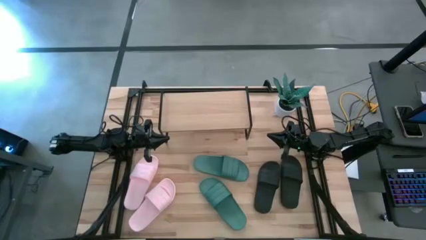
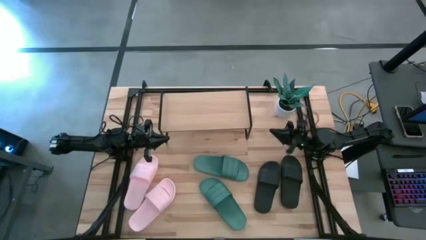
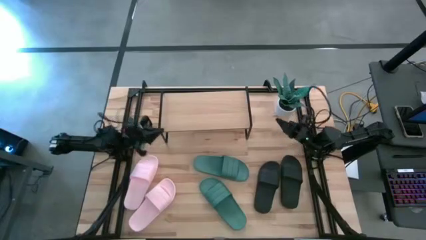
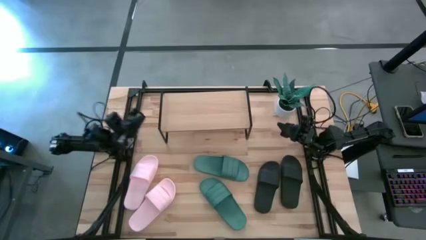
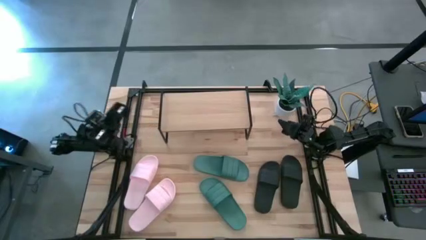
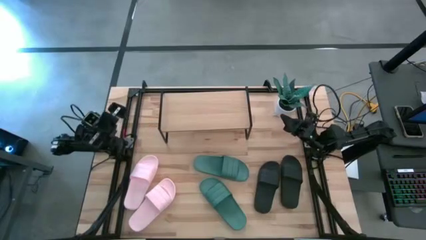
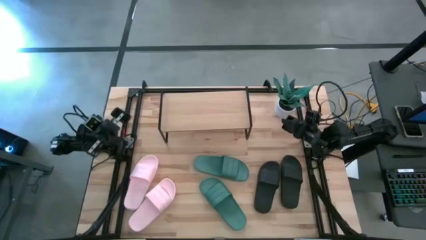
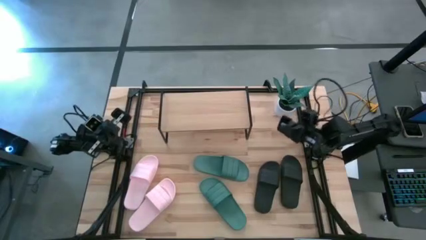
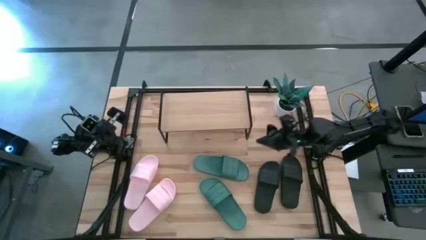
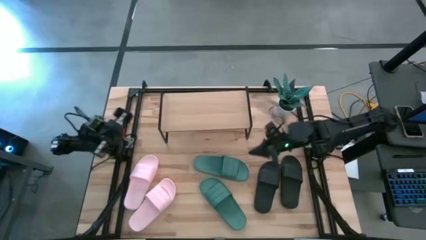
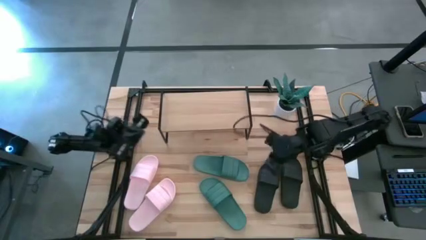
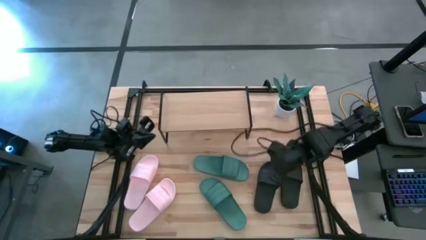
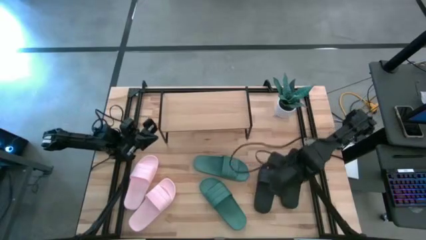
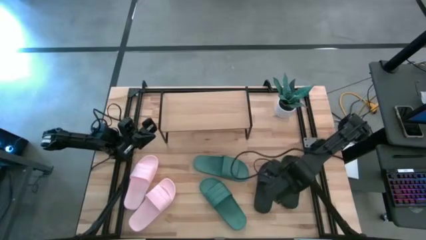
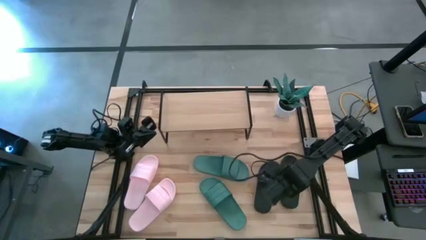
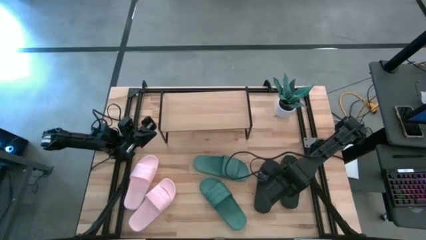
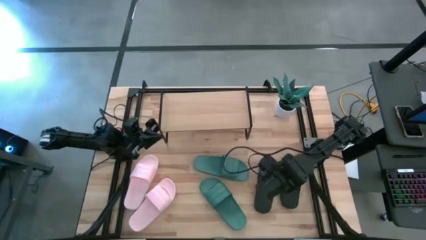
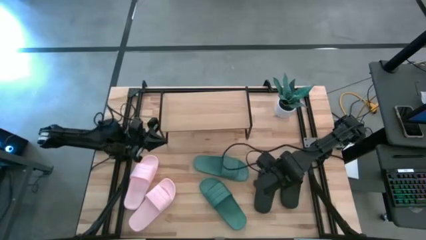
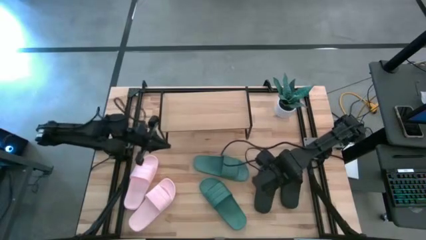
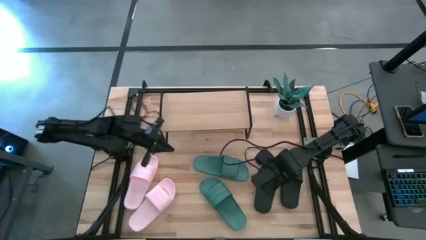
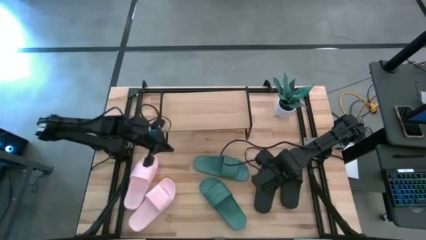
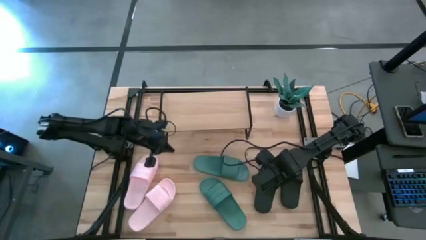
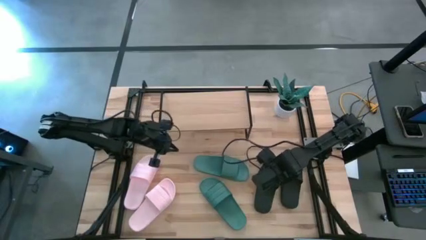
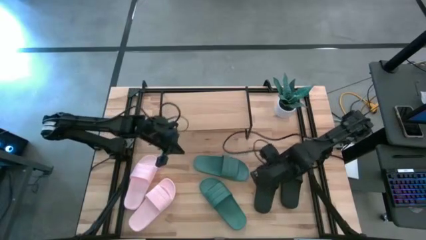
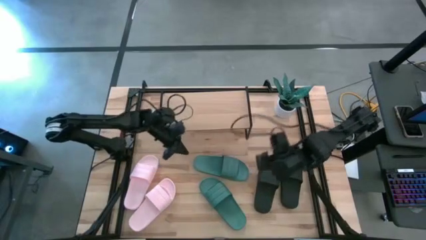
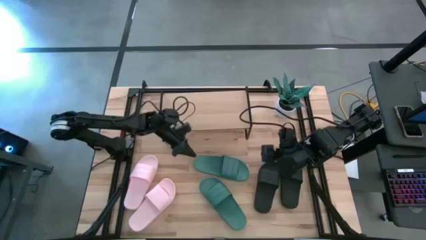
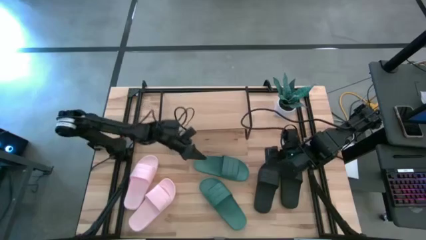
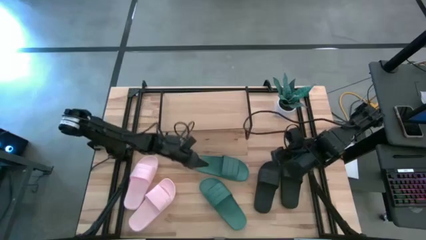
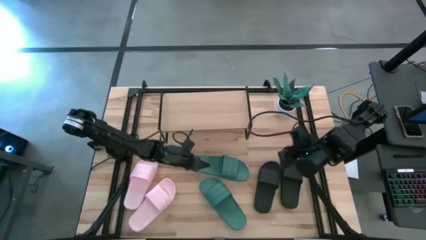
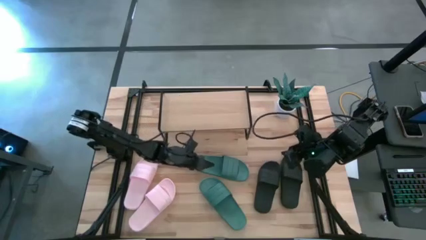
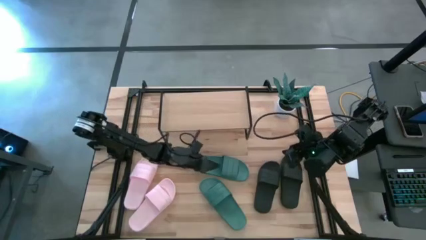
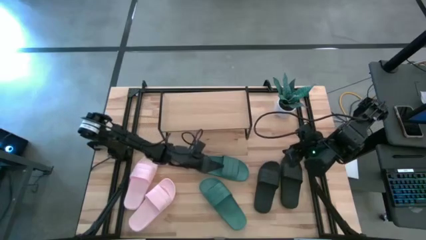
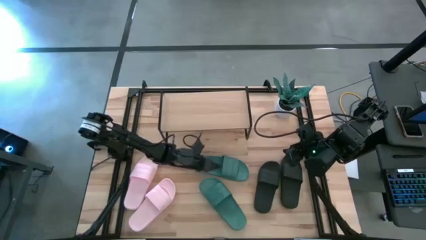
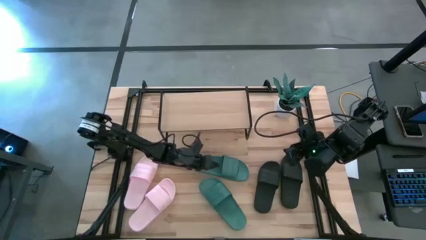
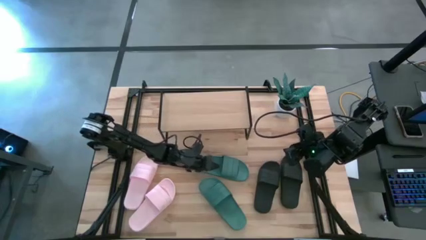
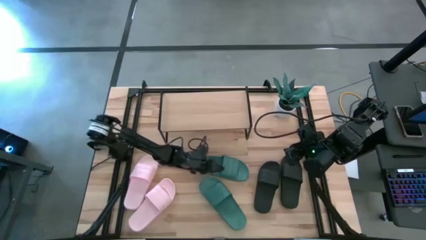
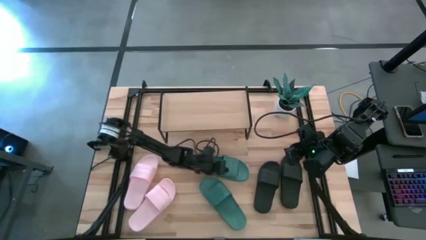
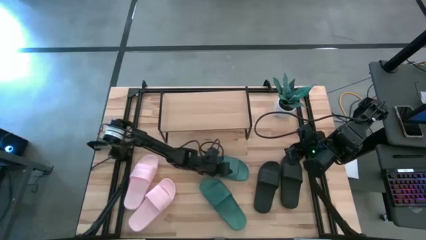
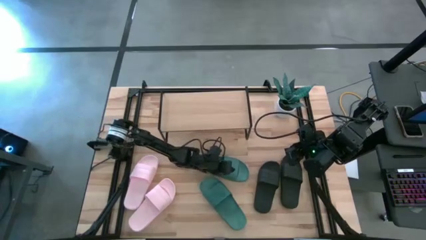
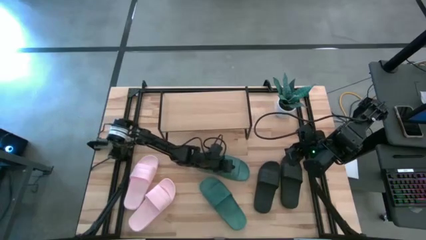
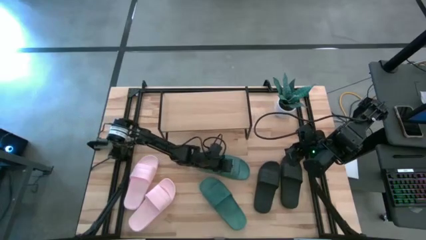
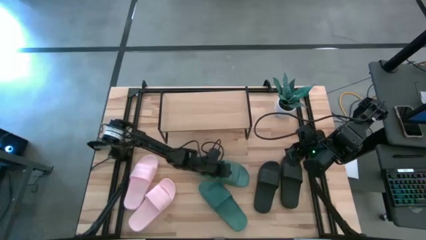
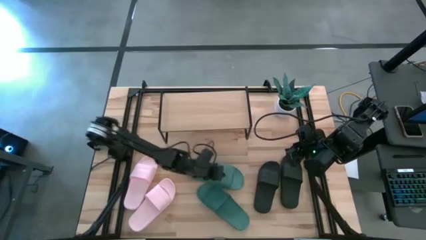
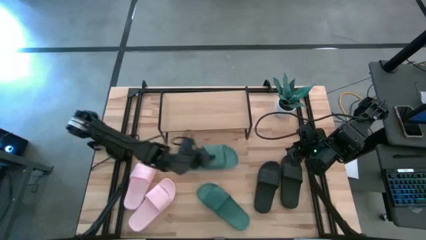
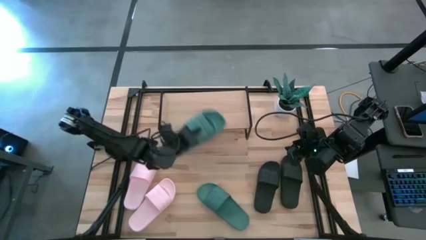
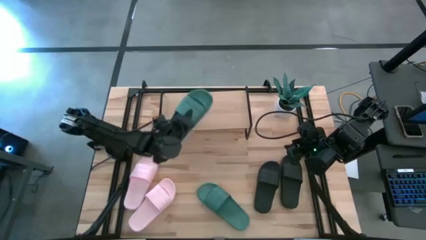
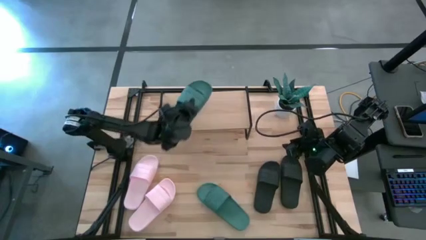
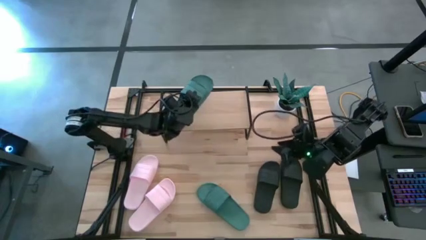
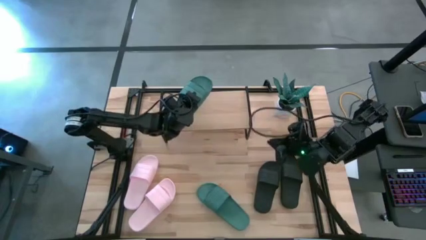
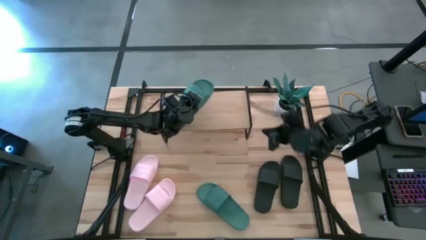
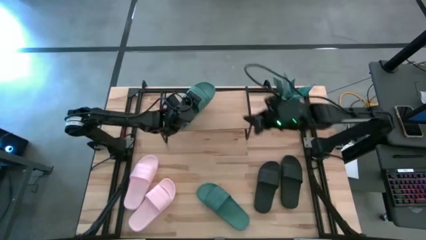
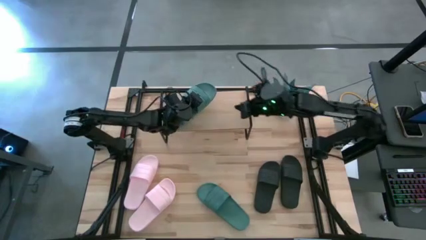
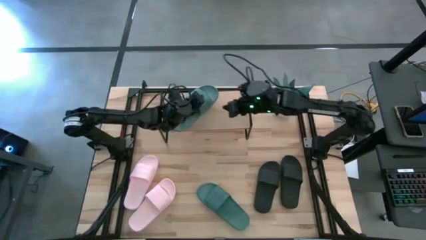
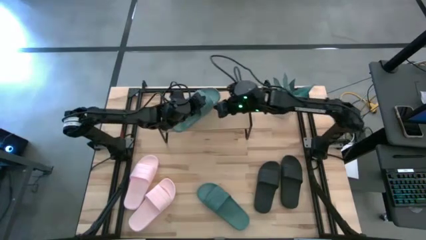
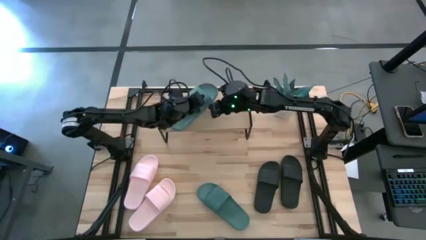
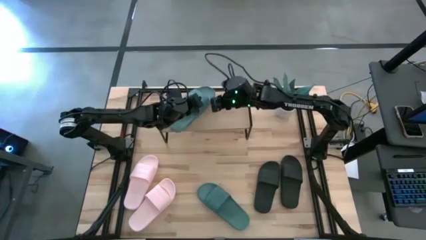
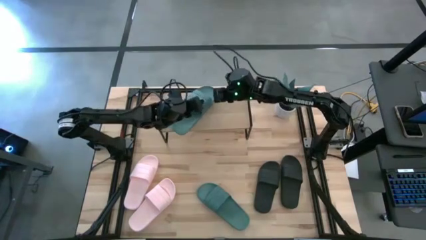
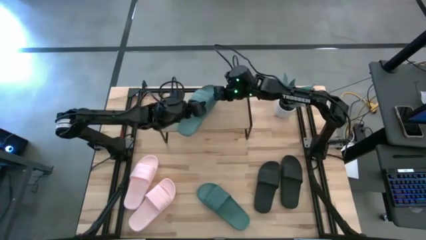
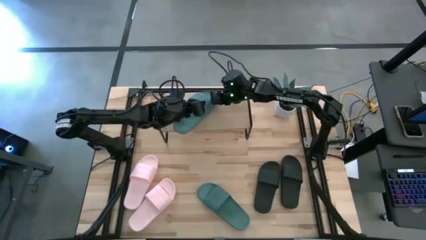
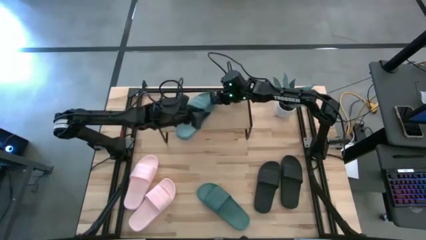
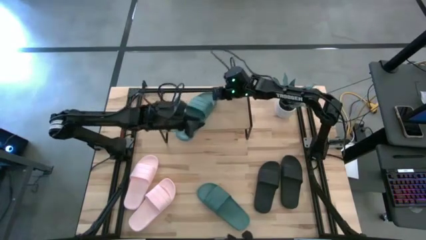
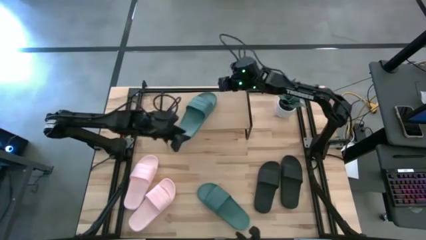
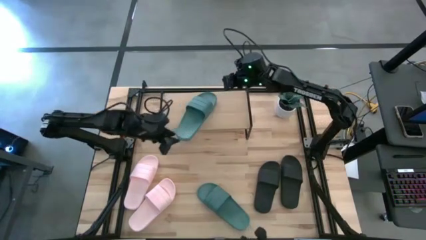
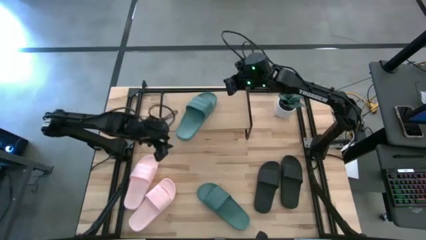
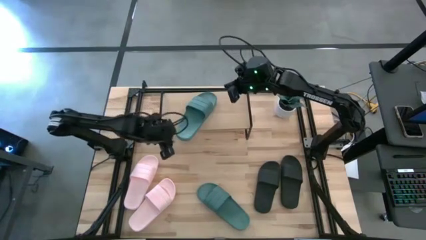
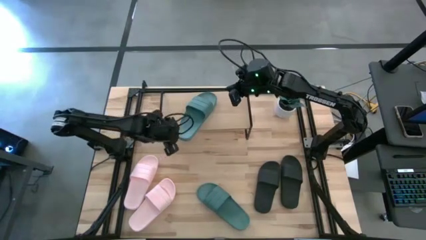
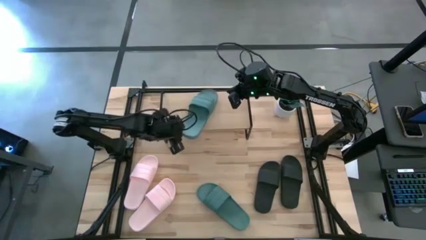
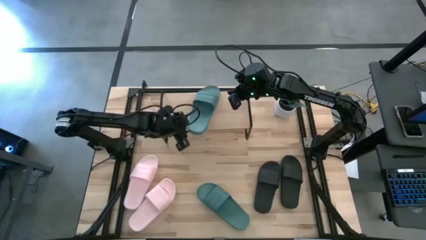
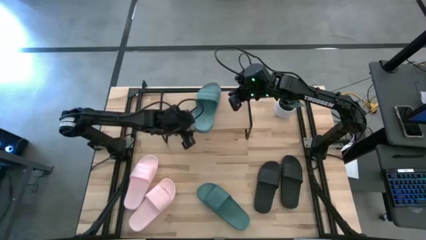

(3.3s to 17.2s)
Task: Pick and place slides into the shelf
Put the top green slide on the shelf
